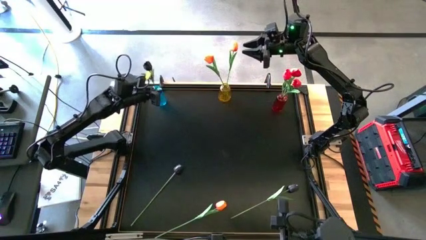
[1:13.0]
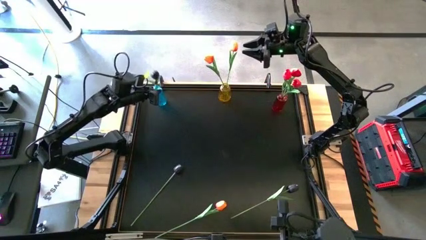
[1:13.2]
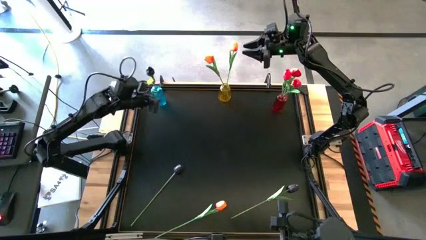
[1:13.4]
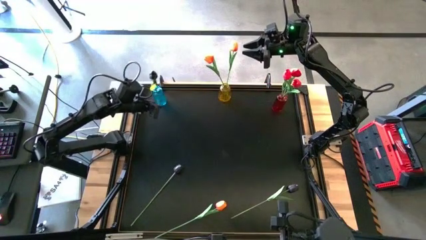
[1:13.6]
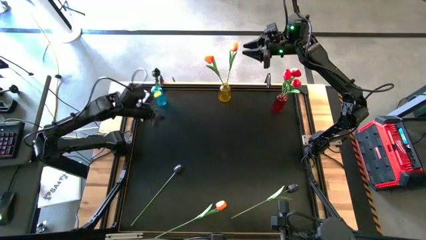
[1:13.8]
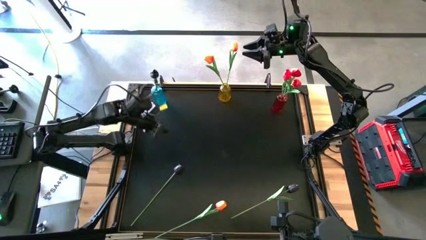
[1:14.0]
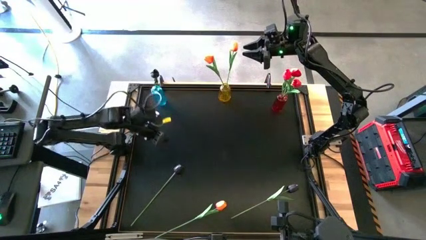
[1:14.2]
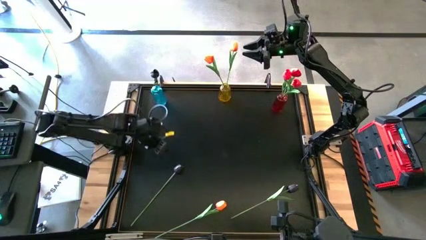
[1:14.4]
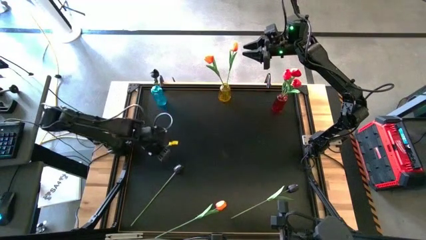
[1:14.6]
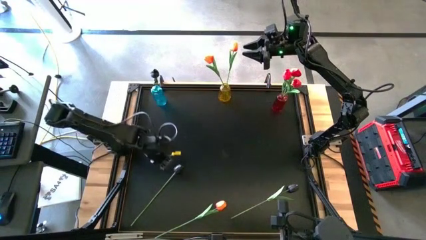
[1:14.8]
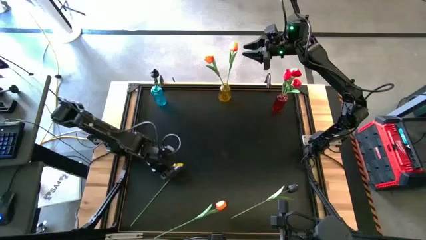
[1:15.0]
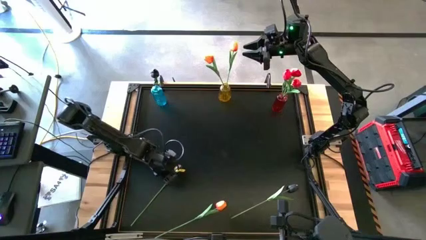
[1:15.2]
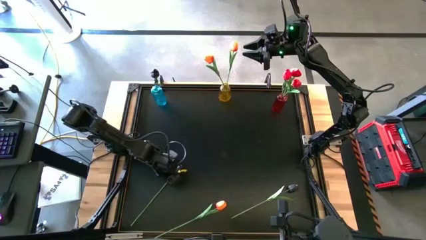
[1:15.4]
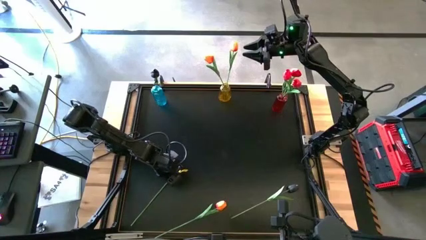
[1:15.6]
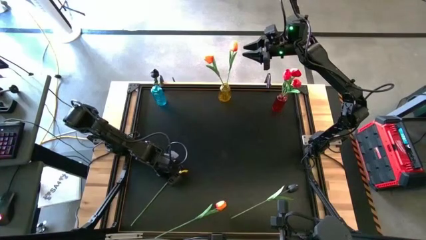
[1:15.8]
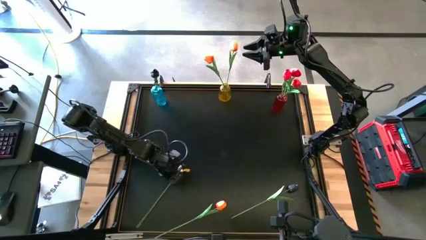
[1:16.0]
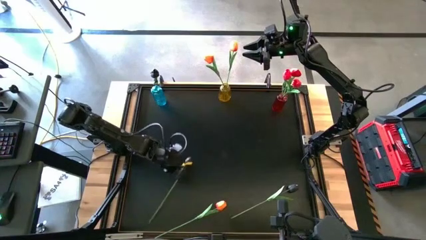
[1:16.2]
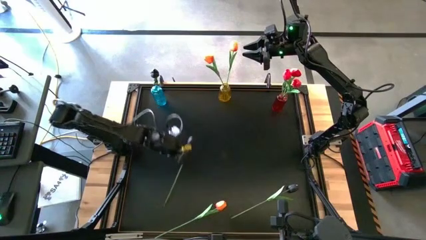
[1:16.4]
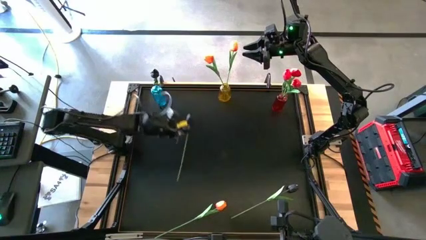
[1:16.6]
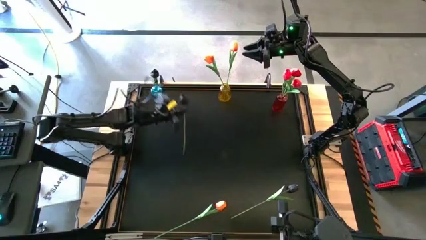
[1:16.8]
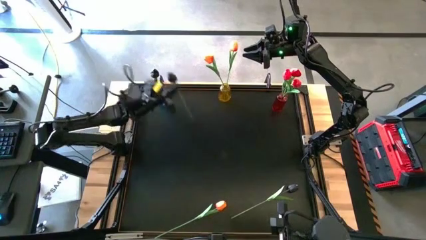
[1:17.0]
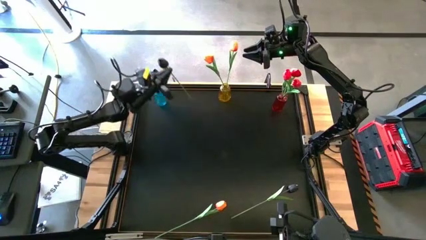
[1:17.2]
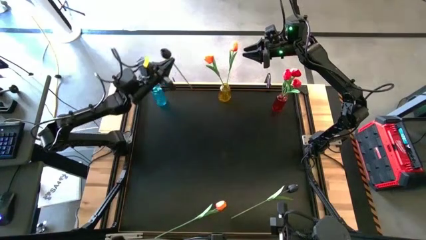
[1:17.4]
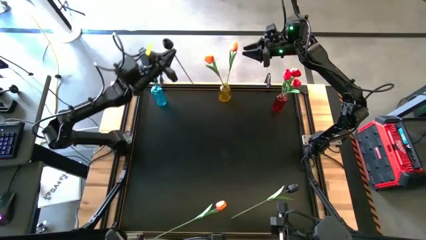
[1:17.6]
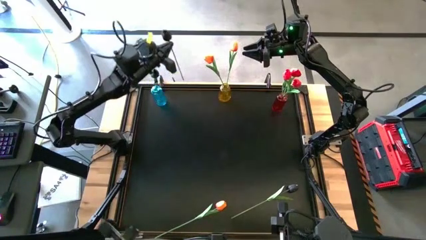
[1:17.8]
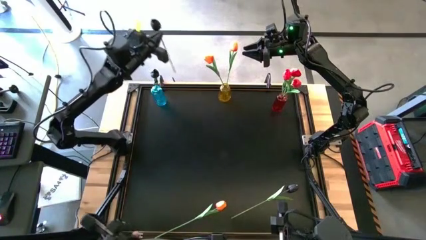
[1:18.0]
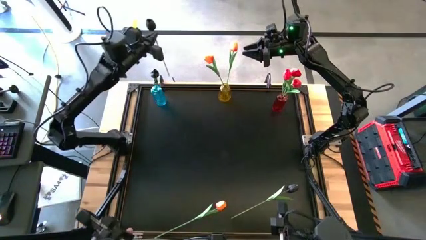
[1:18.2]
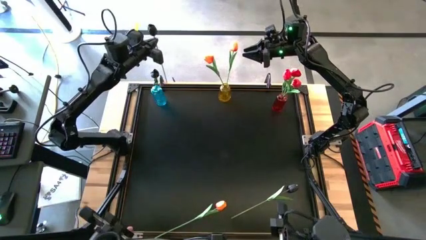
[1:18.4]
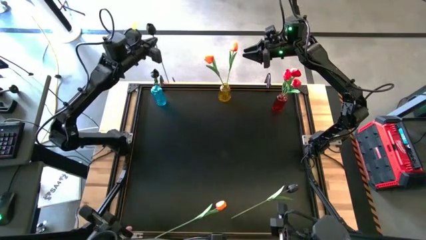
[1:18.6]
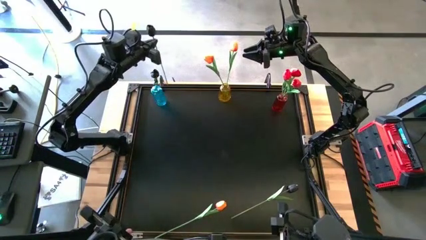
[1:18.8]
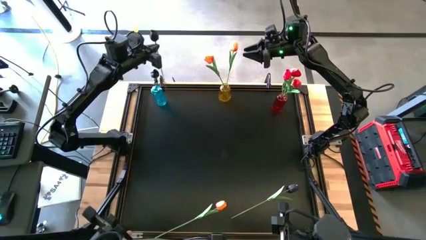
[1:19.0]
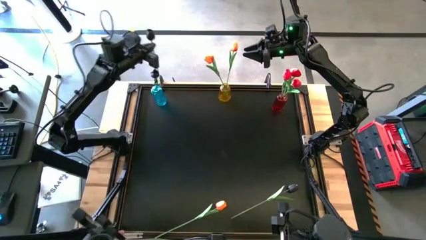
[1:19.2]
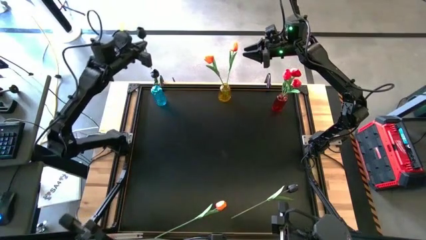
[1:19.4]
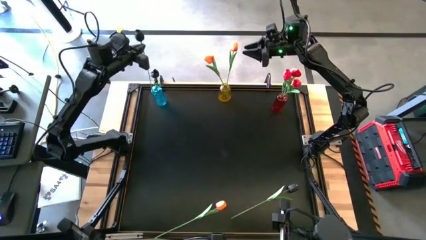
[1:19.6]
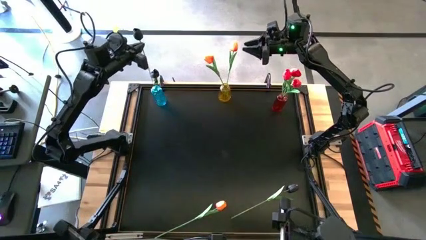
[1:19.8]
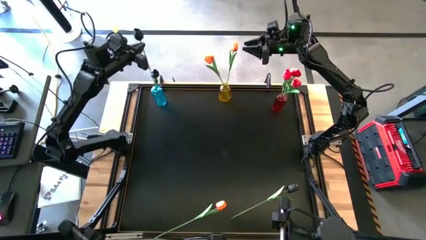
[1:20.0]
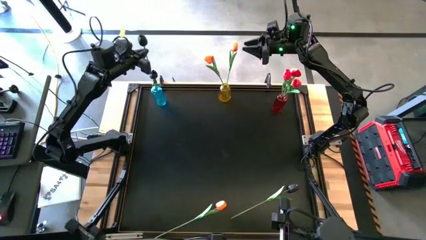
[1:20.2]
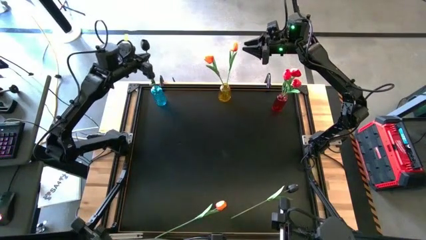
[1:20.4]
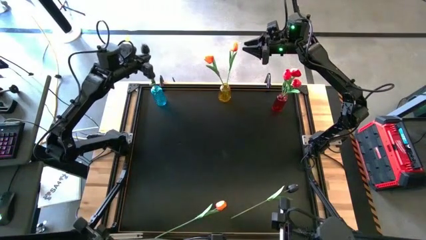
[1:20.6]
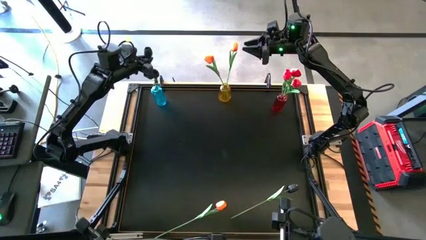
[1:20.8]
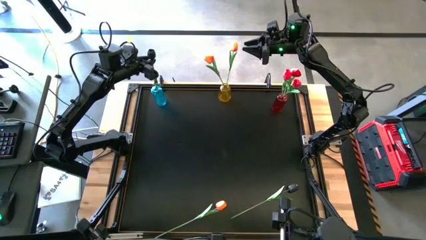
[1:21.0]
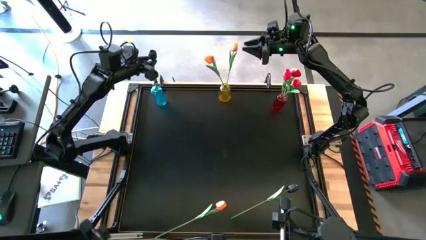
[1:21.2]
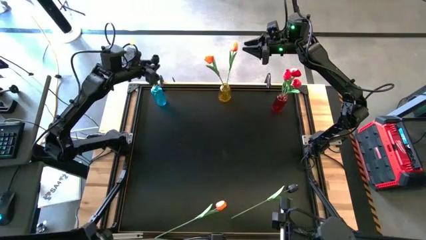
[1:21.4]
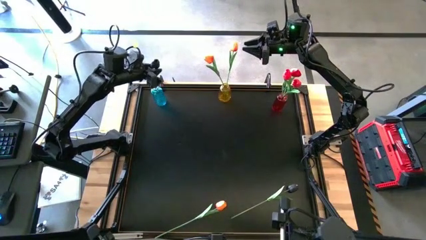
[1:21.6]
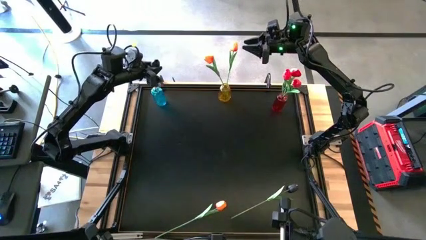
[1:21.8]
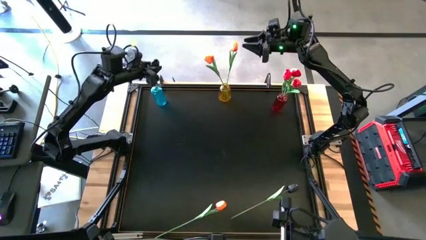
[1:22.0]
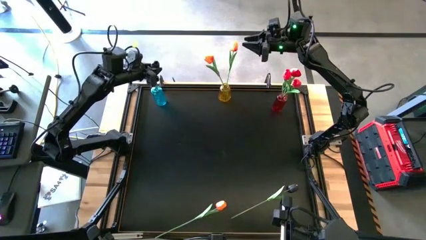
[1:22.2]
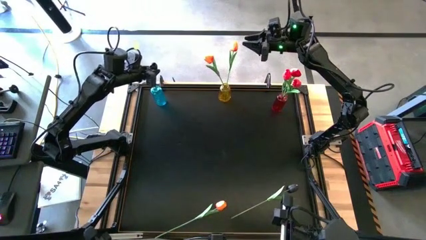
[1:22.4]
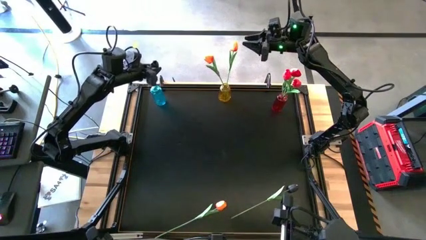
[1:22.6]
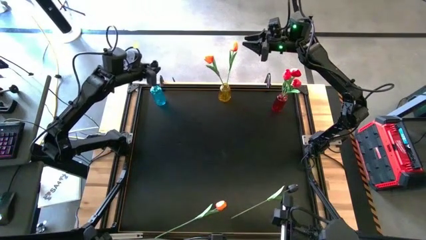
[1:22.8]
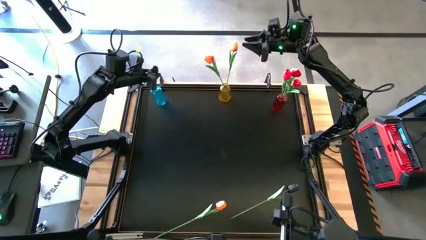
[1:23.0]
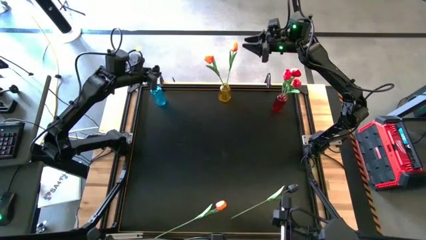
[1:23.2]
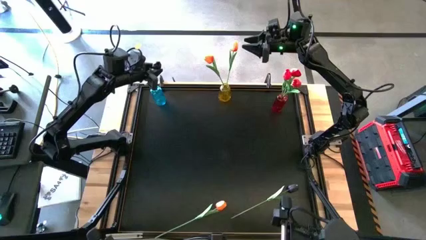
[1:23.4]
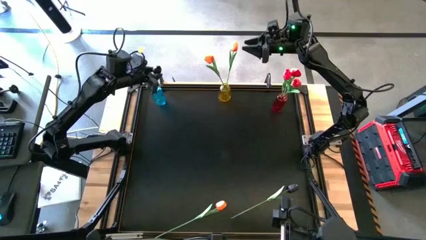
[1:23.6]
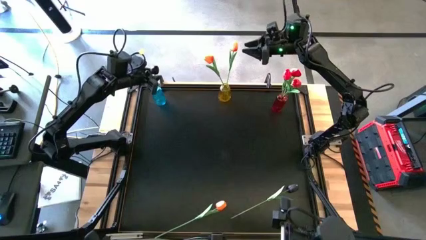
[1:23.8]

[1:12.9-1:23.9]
Task: Sort flowers into vase by color
Put the bottom black flower into the blue vase
